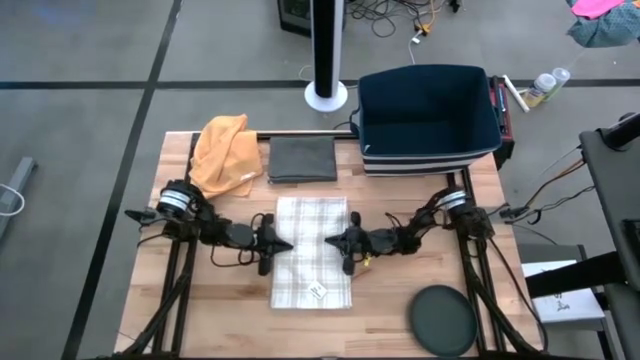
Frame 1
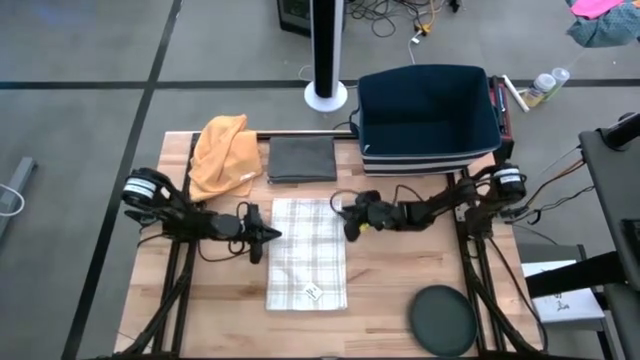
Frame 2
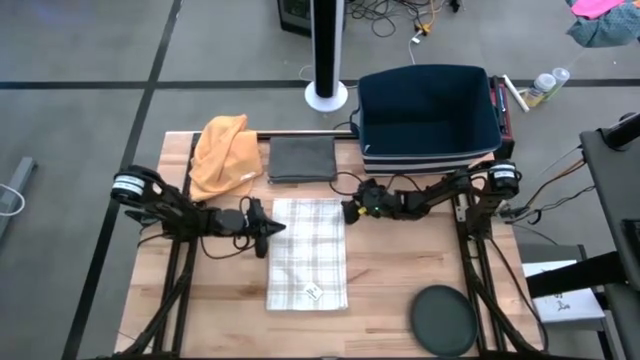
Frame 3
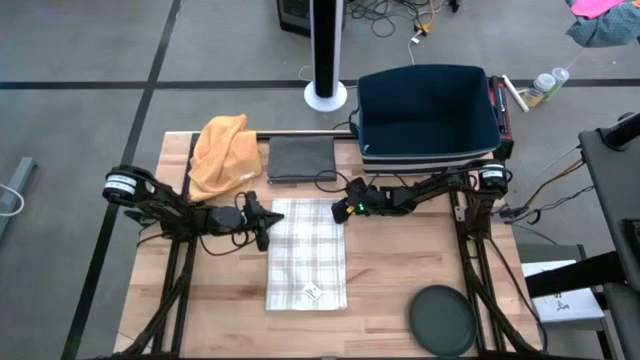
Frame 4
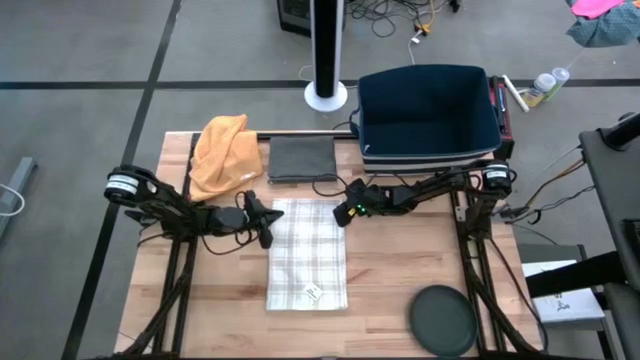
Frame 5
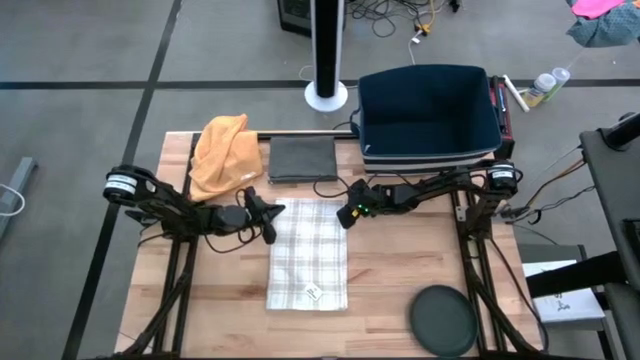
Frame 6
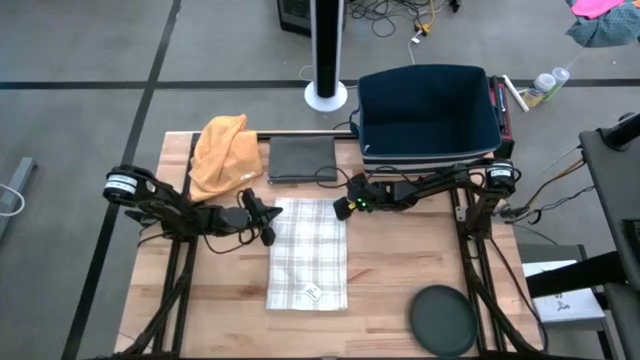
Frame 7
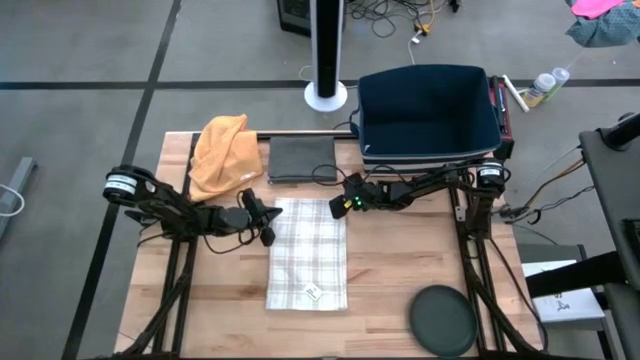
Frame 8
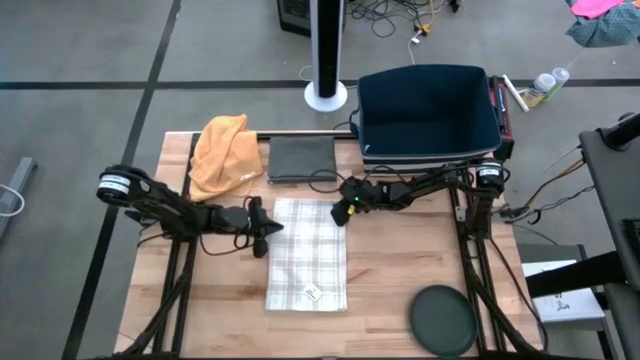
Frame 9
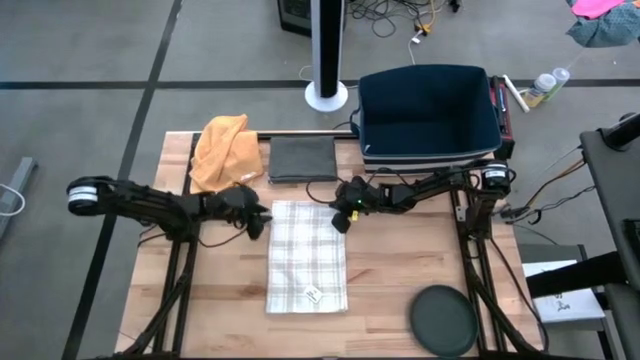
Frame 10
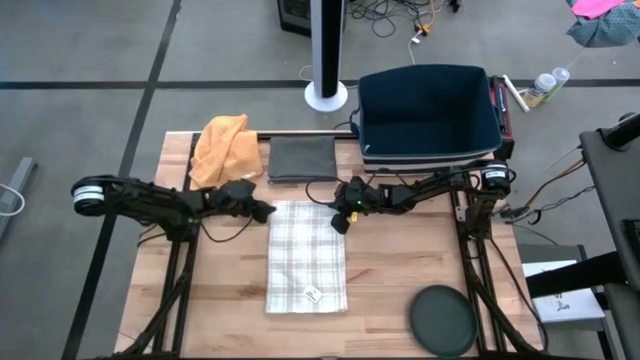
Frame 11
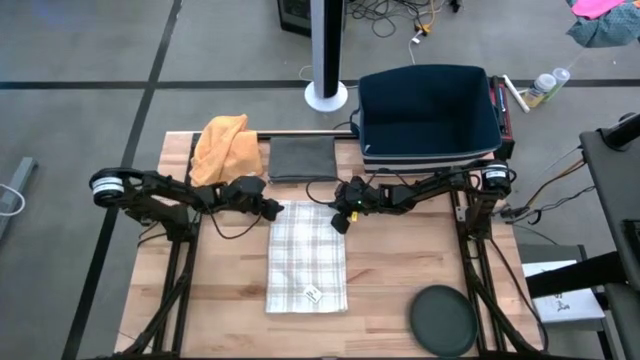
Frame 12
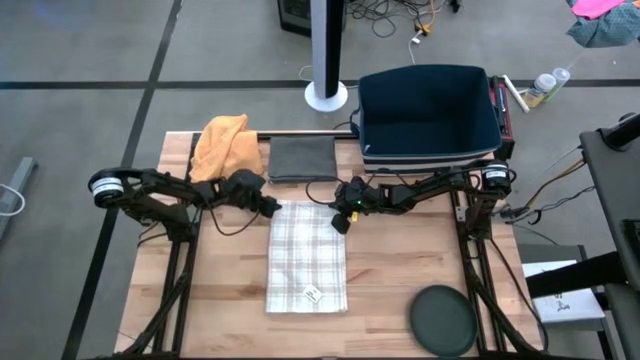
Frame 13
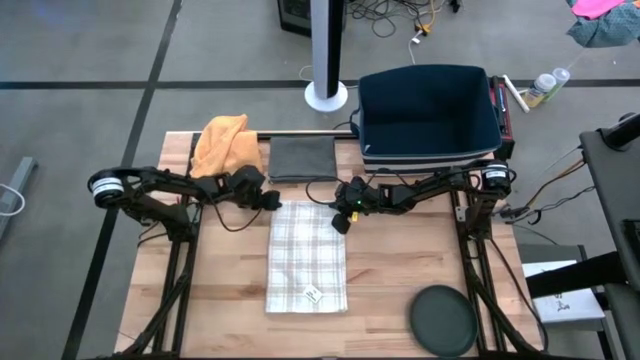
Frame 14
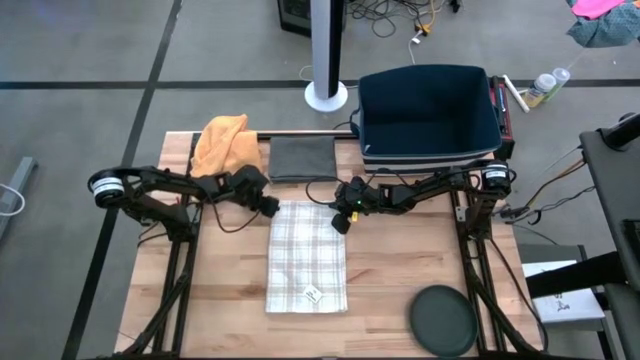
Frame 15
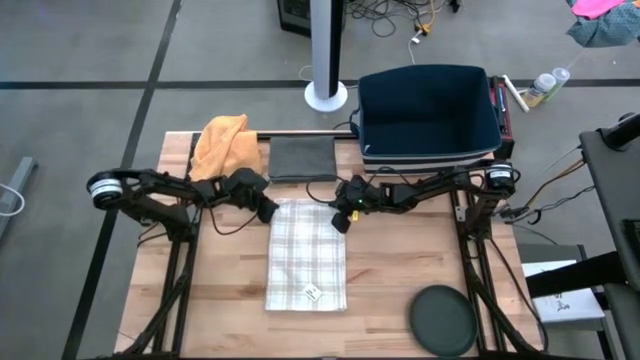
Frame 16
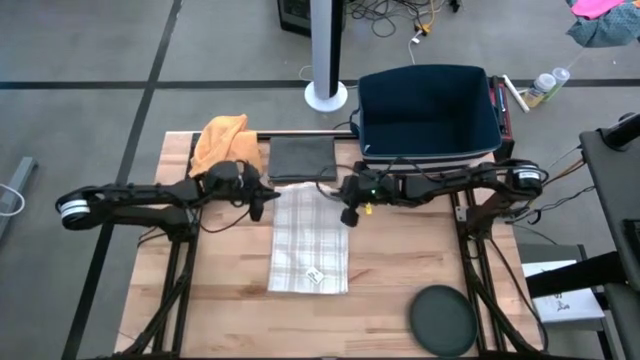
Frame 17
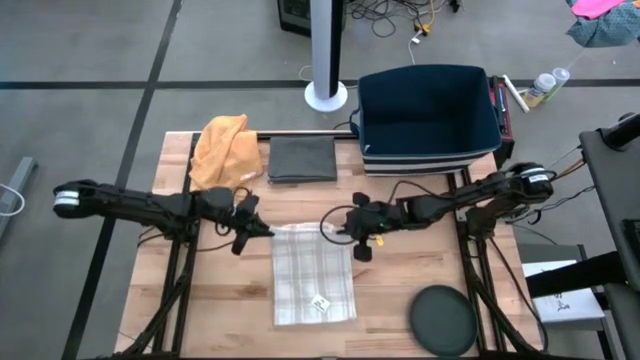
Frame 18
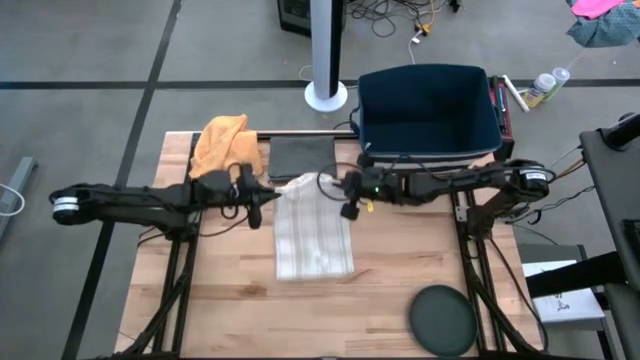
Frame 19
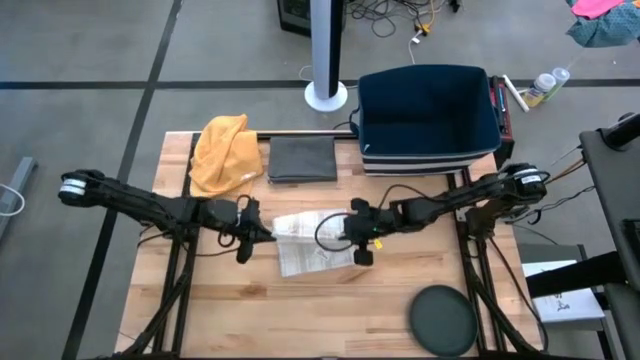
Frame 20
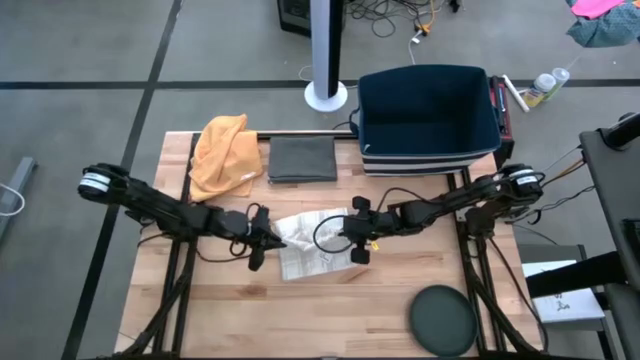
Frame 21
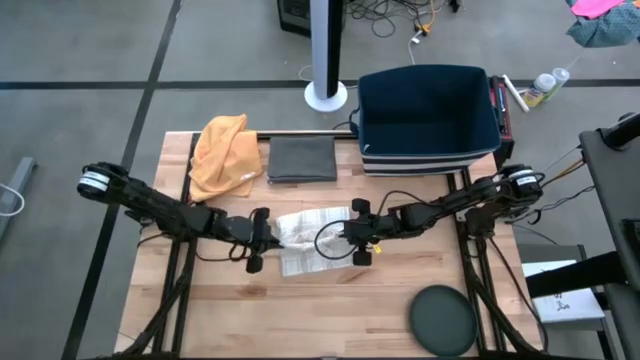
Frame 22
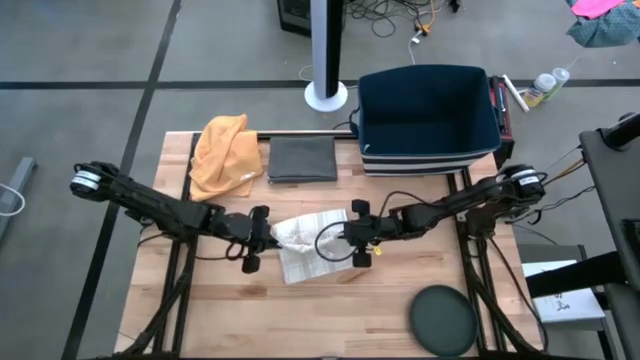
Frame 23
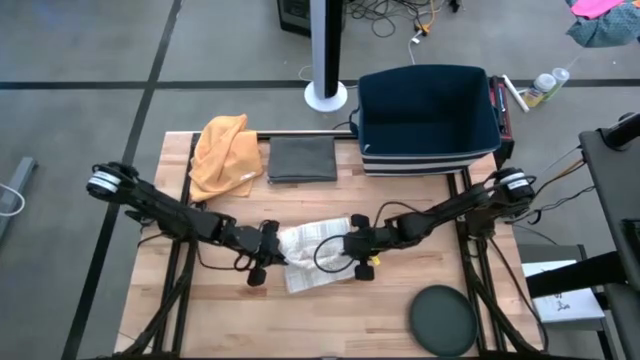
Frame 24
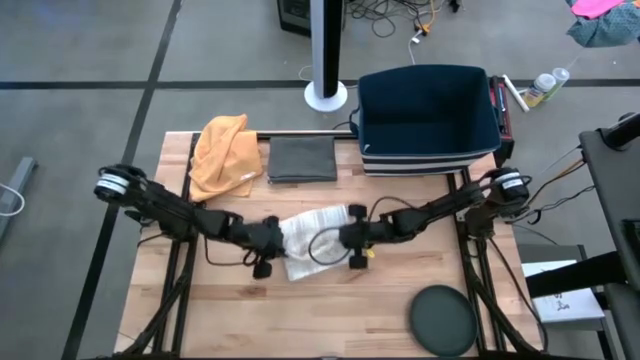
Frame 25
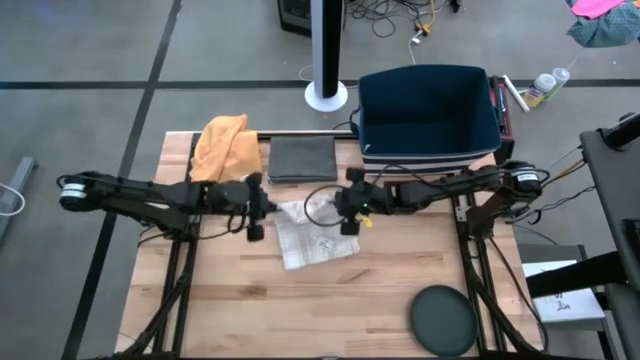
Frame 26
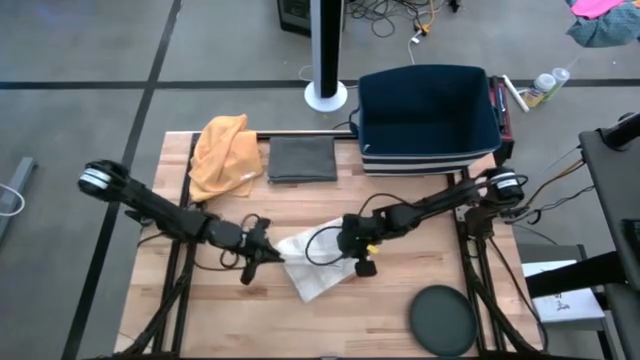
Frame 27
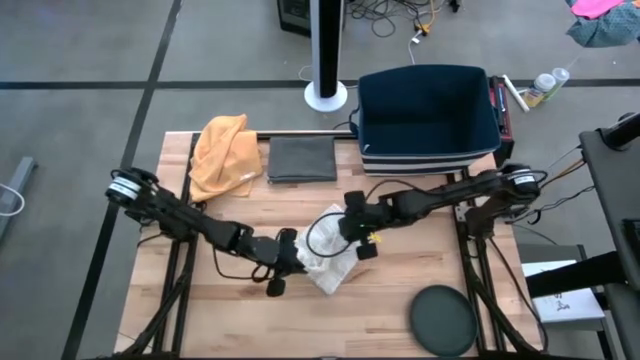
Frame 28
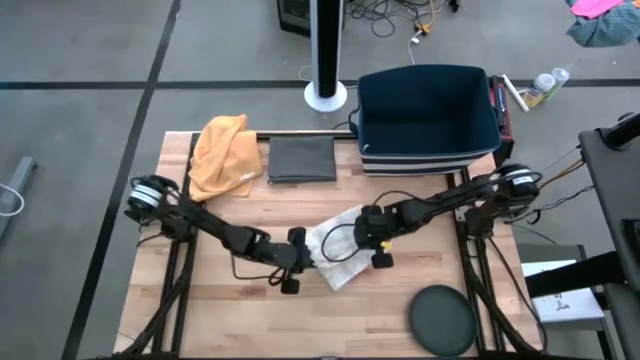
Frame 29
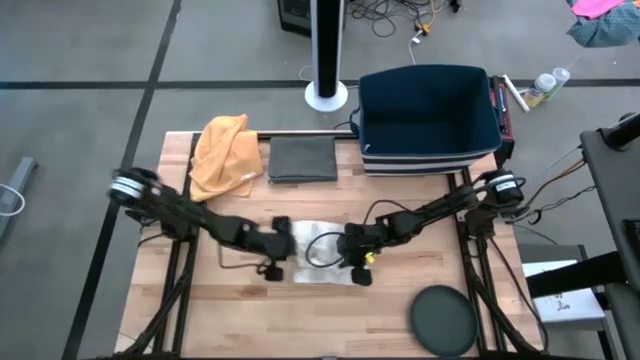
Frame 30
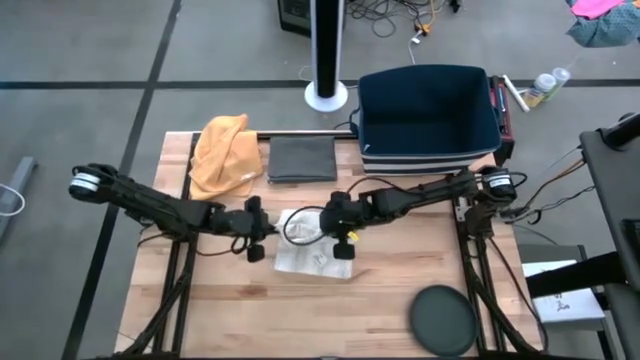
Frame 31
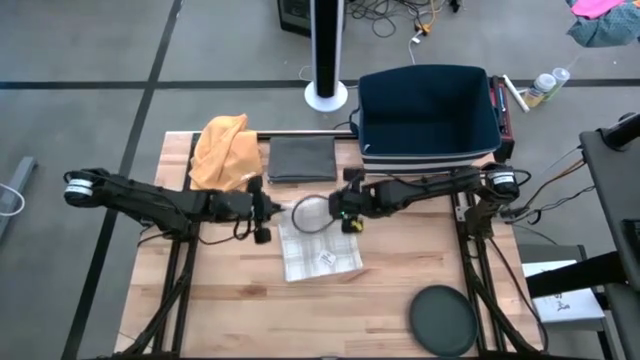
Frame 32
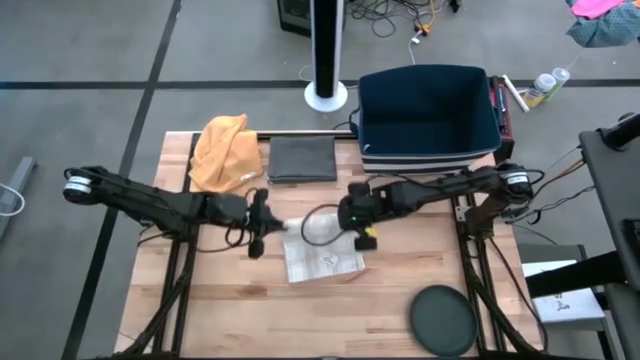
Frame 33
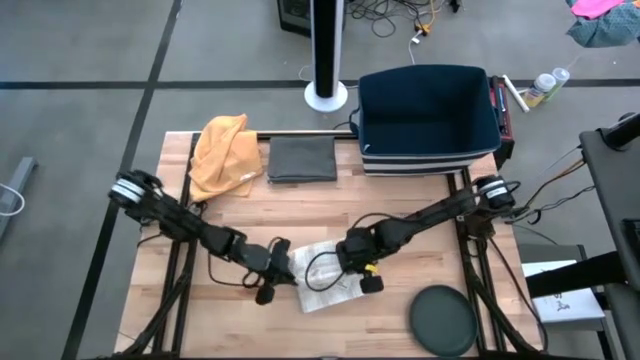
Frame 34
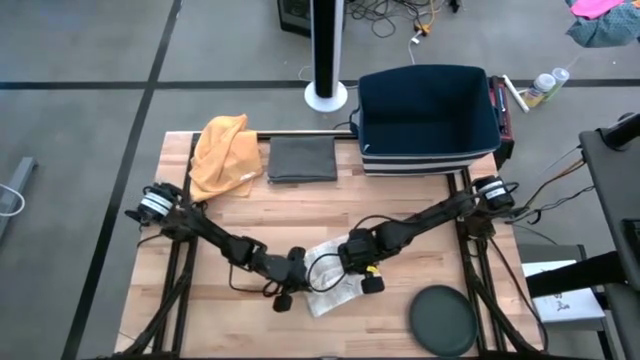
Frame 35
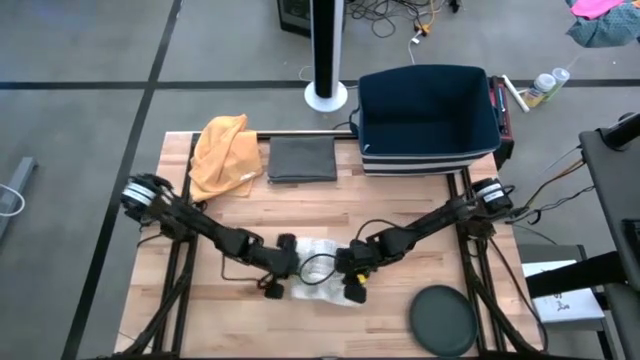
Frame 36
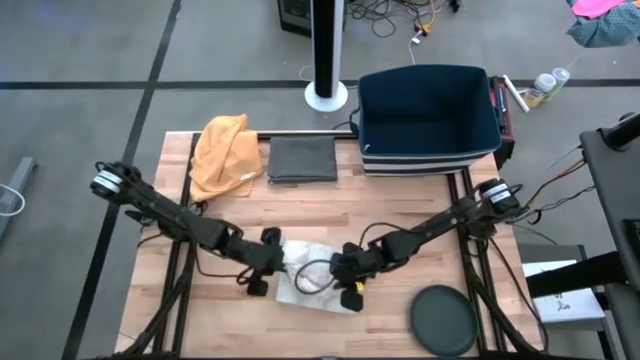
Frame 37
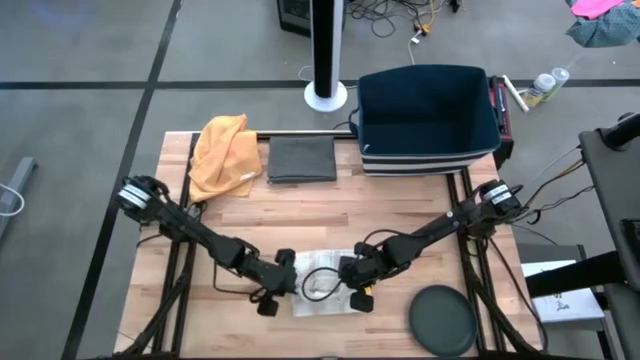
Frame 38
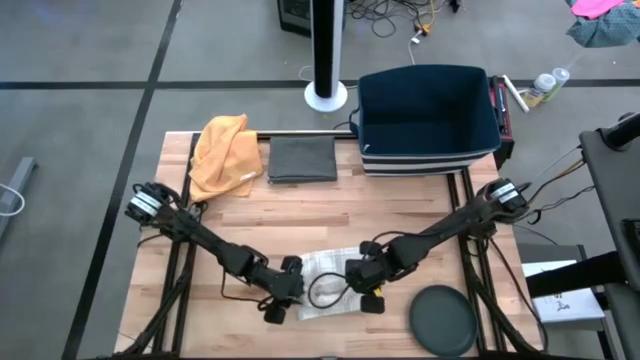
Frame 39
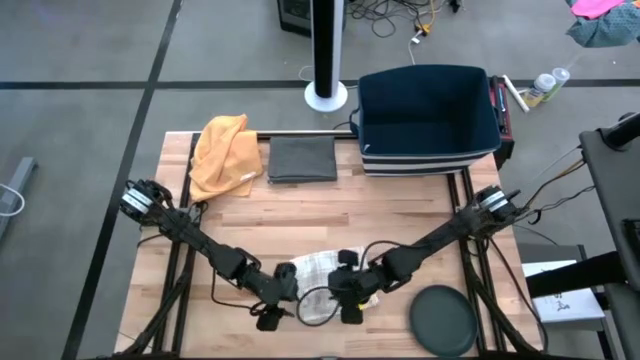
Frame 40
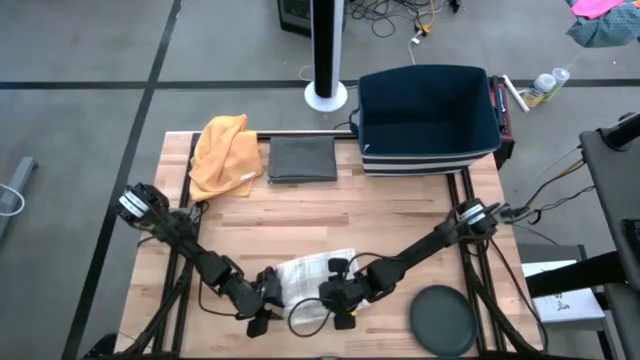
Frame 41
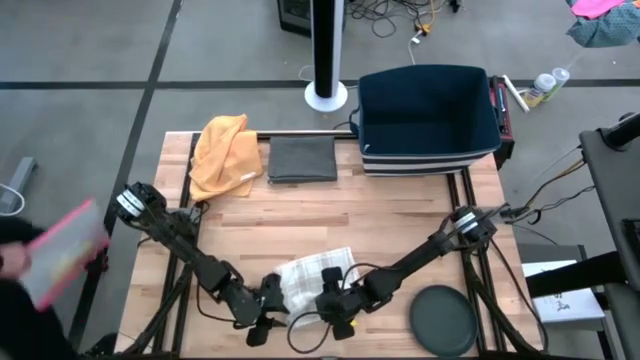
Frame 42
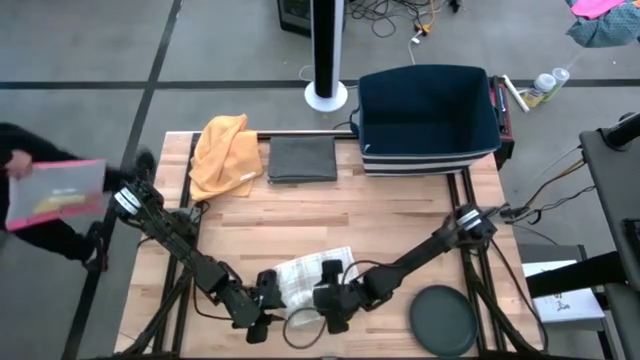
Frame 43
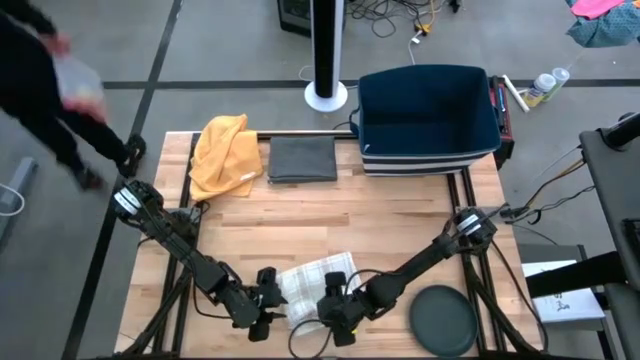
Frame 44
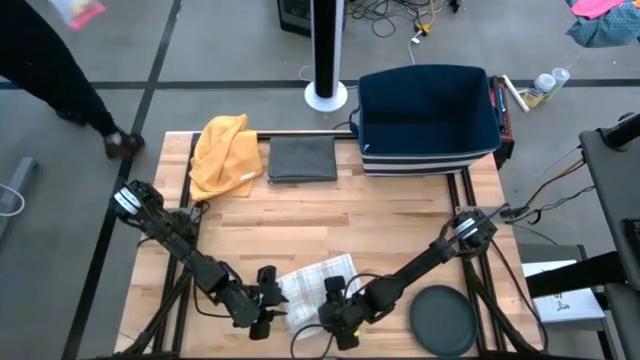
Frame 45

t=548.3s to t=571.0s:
Task: Fold kitchen towel into neat rectangle
Fold the white patterned towel
